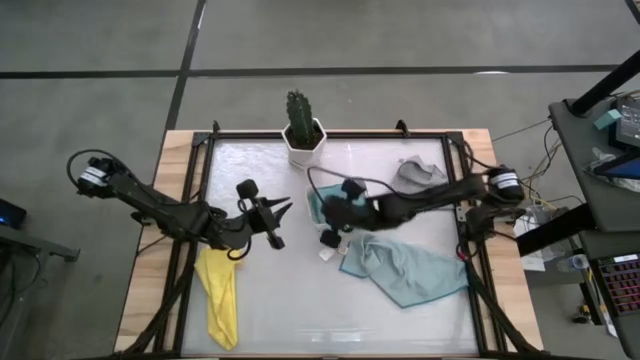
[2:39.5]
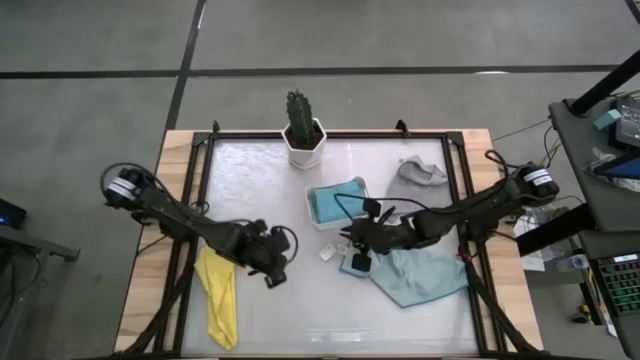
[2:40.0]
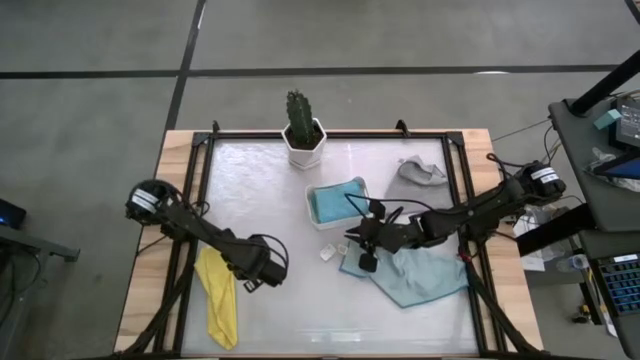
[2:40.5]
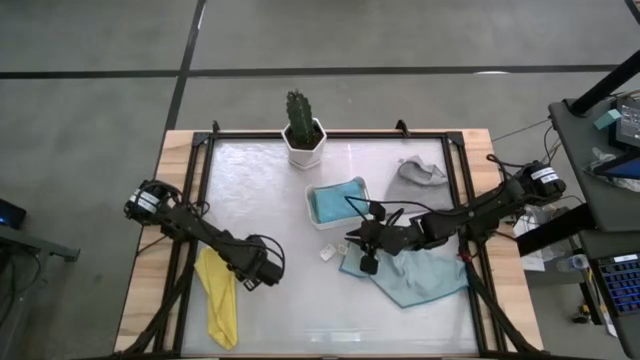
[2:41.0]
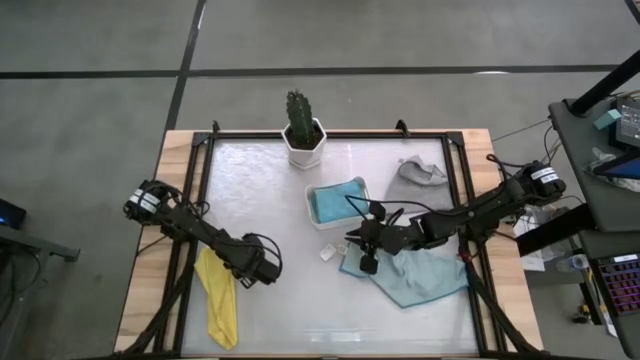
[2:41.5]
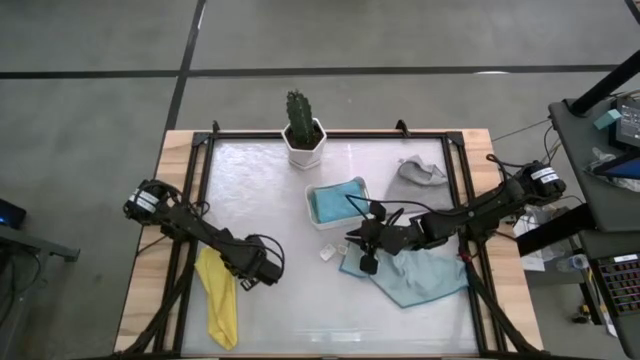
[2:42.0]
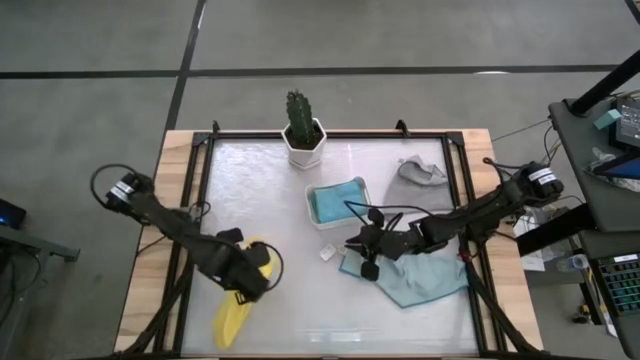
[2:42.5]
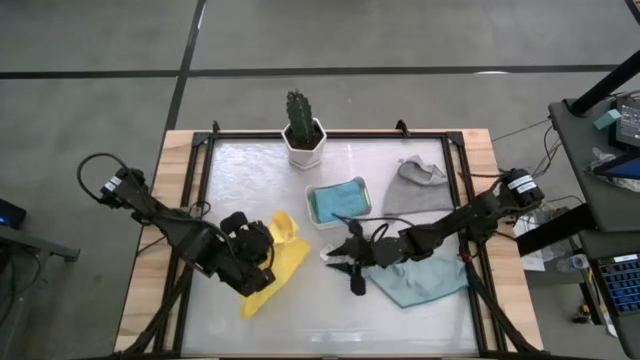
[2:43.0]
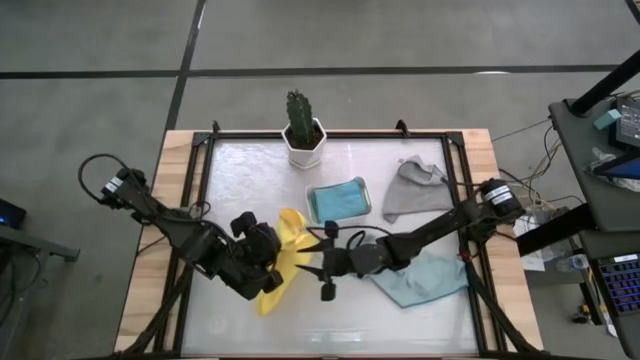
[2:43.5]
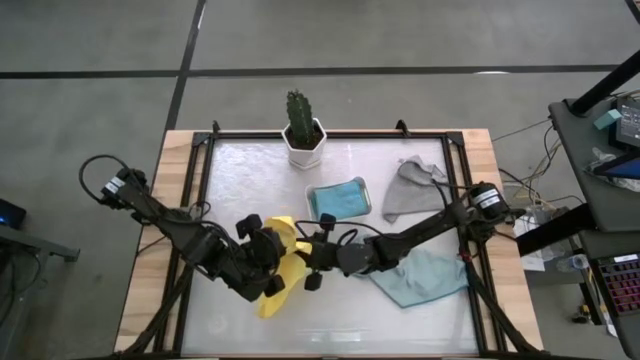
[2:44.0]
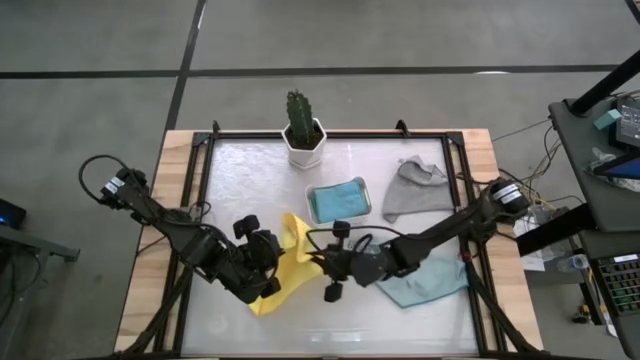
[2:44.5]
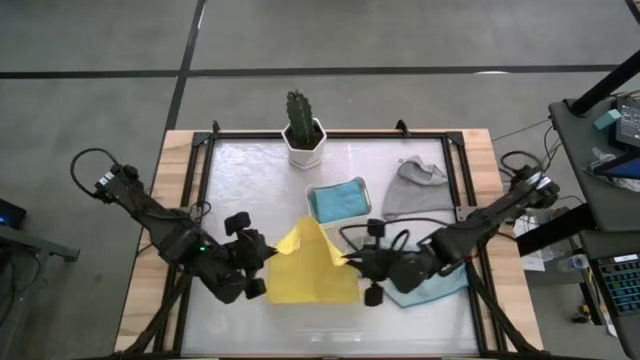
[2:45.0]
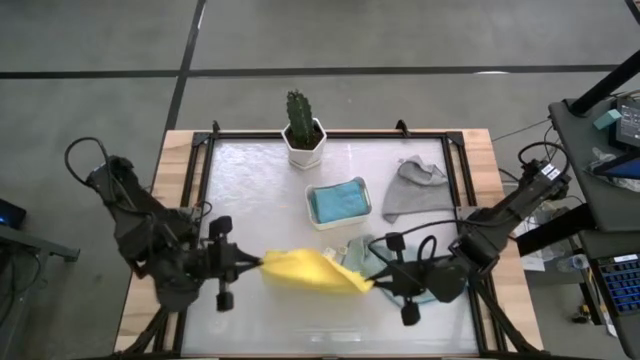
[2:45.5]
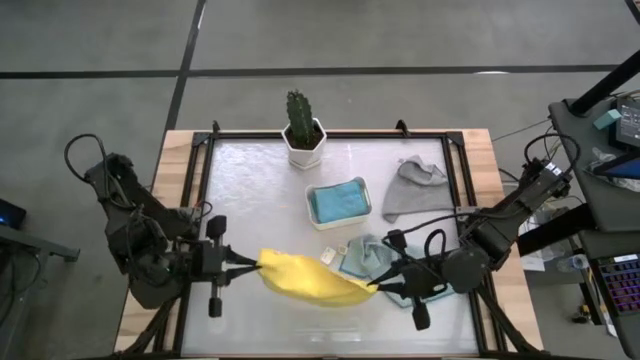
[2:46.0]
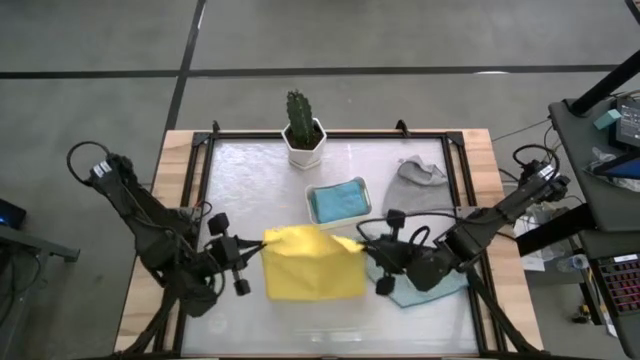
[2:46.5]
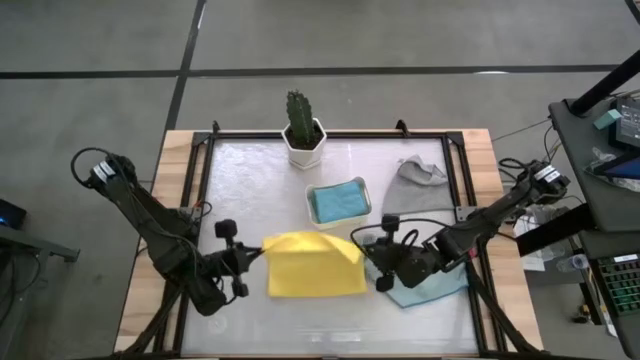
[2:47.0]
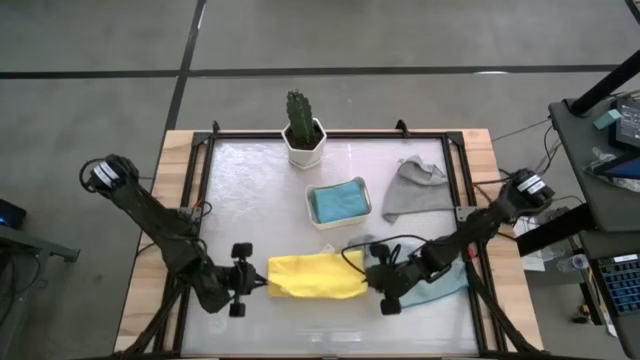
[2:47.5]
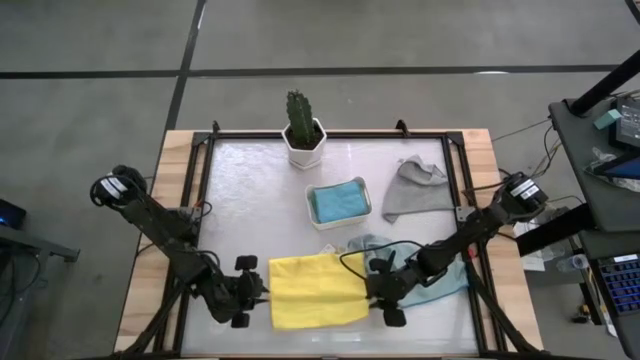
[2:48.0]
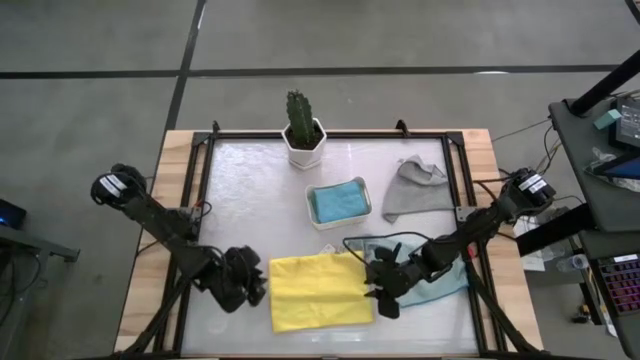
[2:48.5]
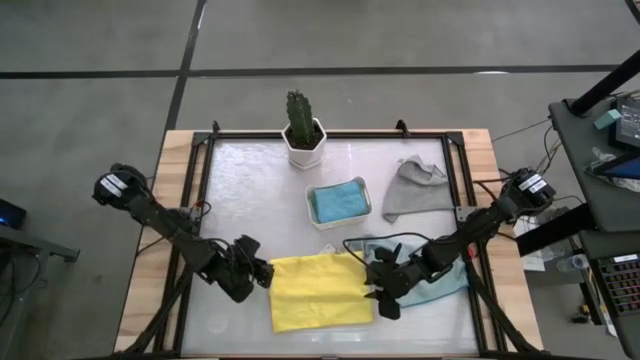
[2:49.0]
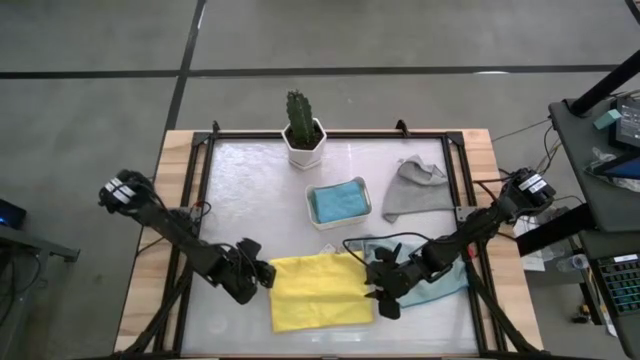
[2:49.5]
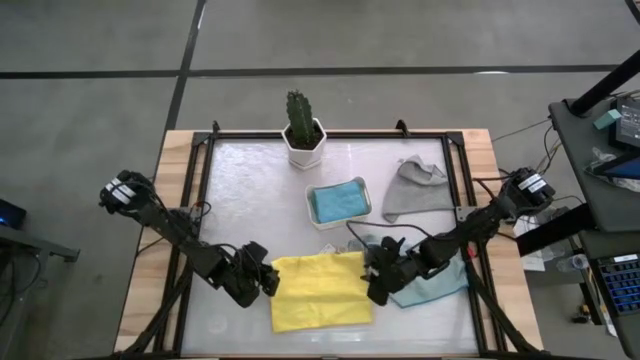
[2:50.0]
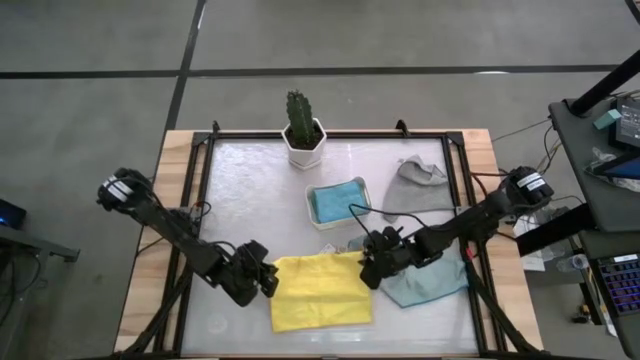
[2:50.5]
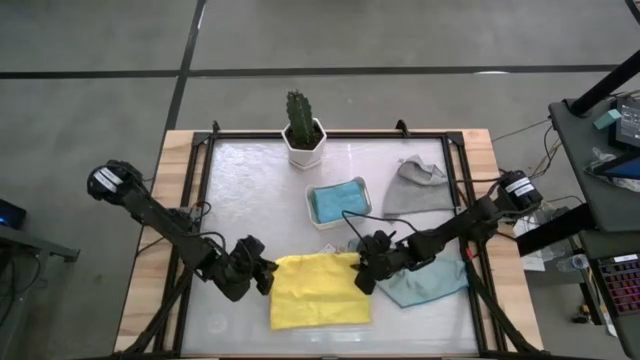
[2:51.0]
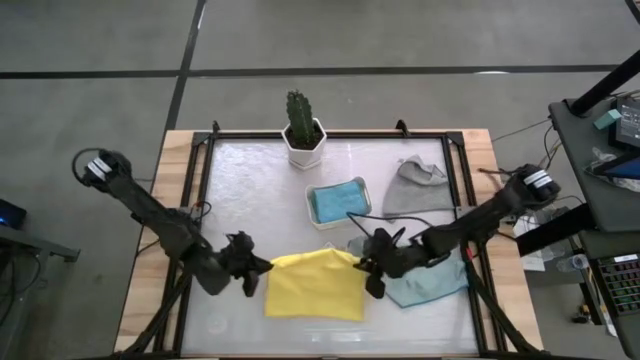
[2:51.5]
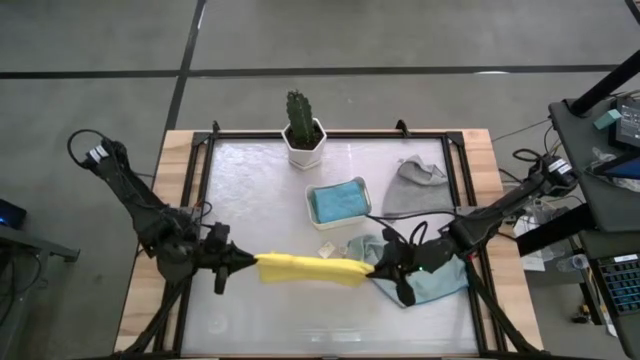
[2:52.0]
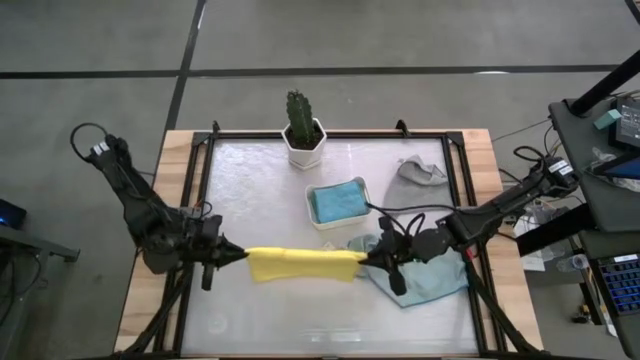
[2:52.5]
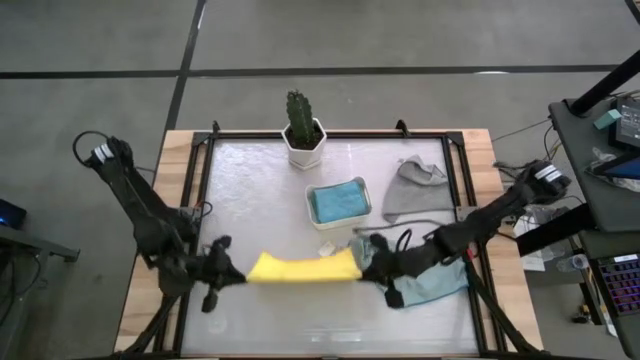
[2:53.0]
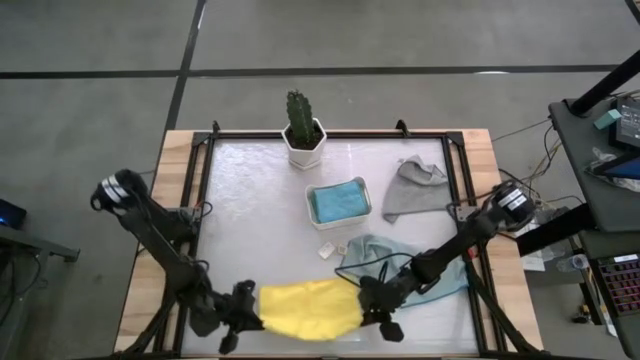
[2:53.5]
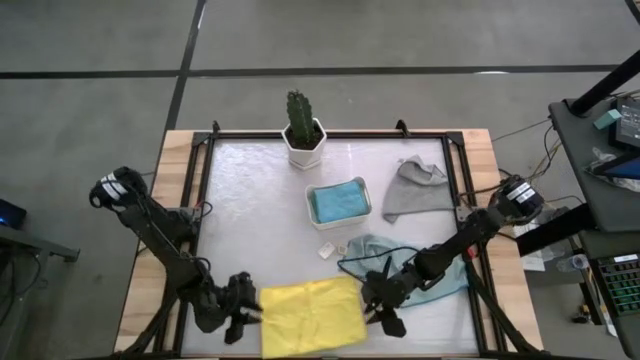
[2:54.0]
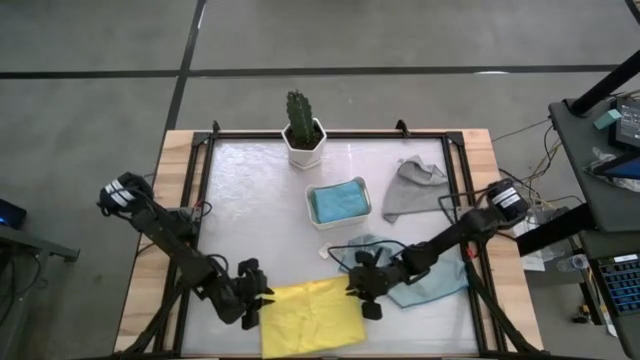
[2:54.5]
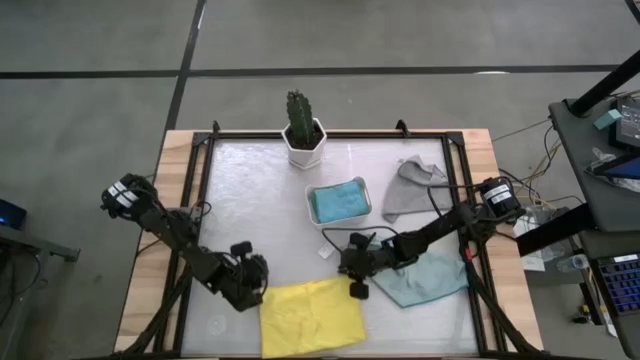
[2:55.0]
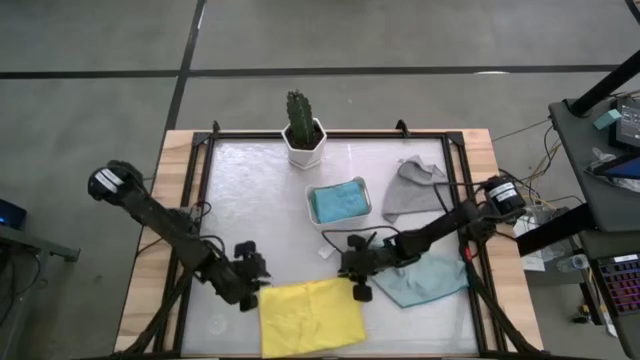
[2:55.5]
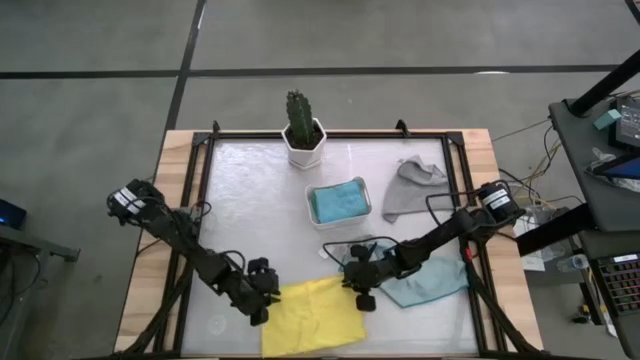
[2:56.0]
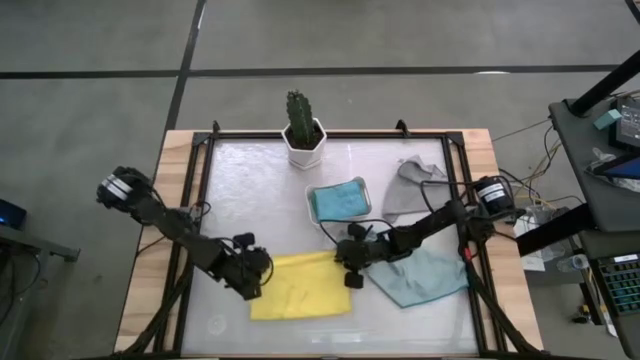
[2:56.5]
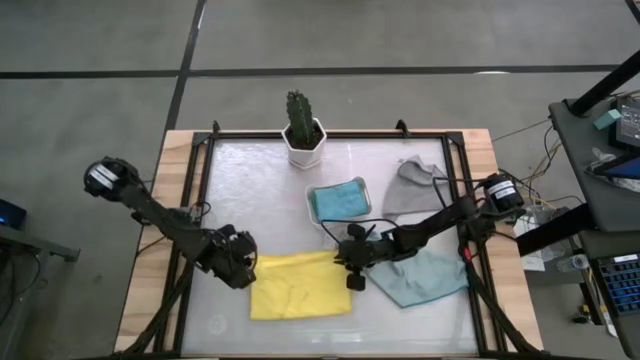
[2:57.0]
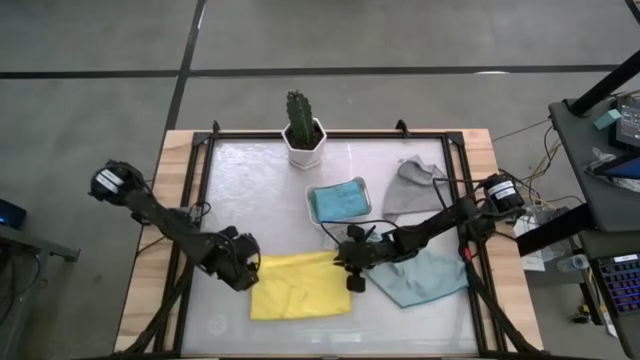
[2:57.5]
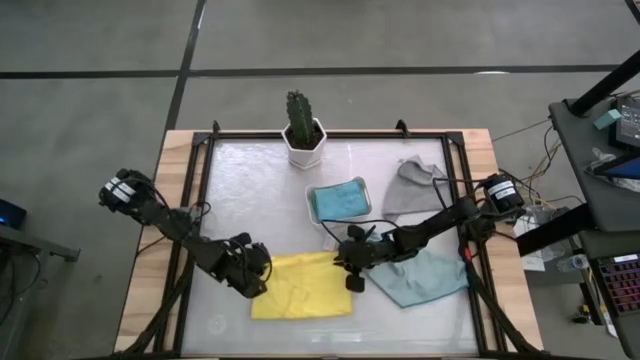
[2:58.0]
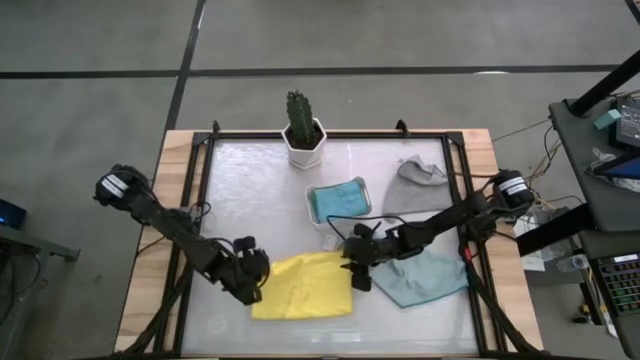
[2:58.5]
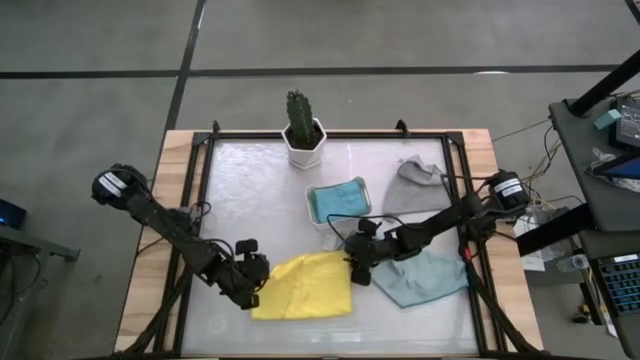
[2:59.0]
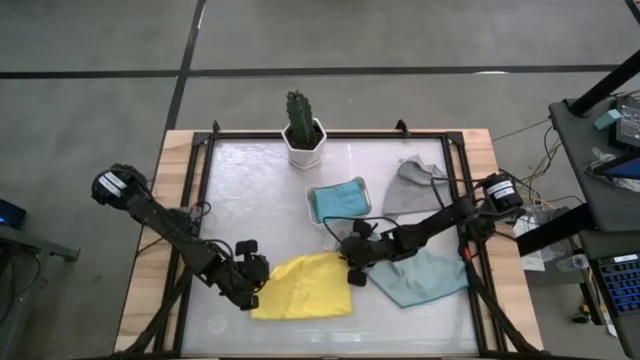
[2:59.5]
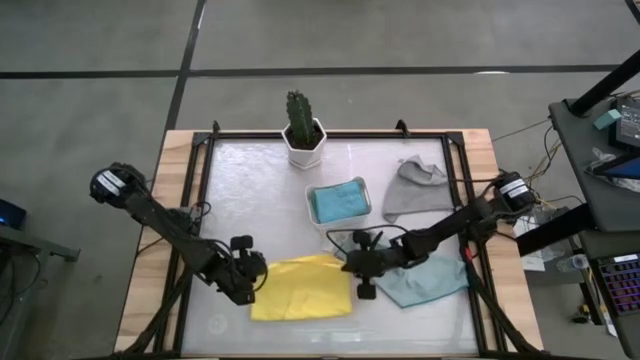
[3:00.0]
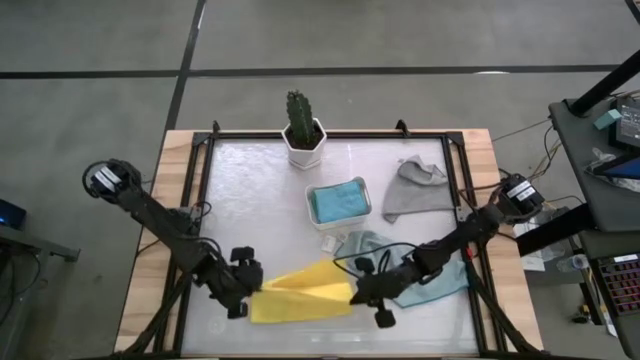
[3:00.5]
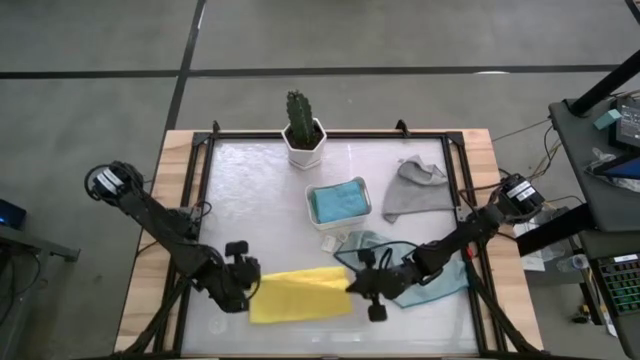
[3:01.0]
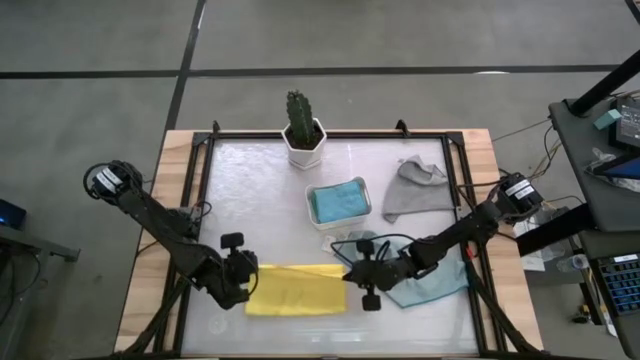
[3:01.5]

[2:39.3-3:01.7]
Task: Fold microfiber towels
Fold the yellow towel
